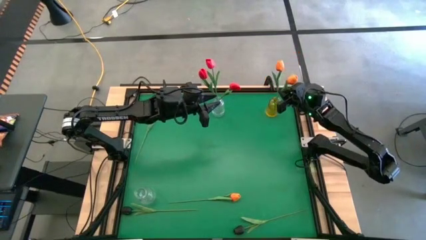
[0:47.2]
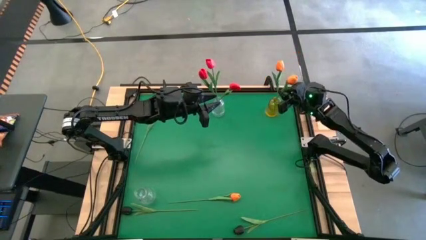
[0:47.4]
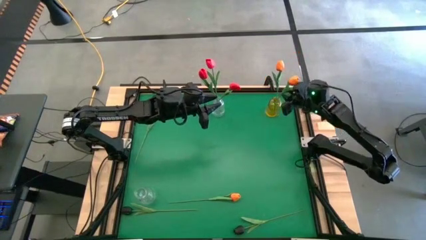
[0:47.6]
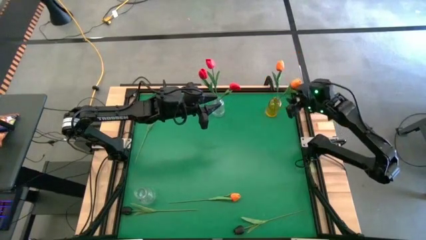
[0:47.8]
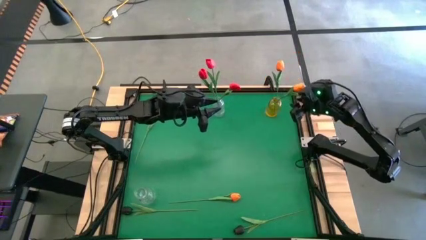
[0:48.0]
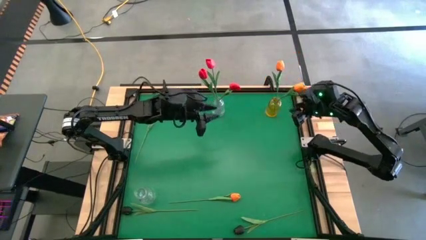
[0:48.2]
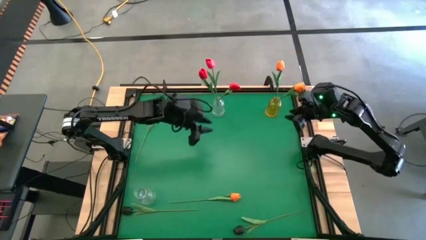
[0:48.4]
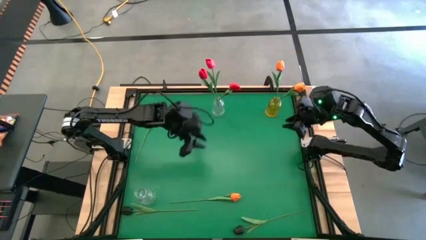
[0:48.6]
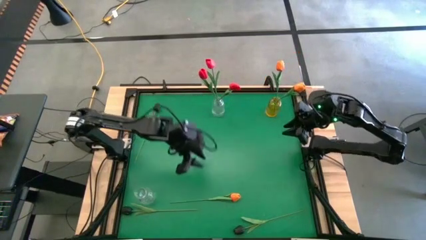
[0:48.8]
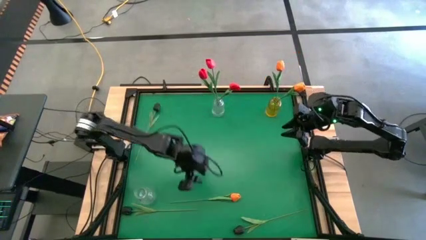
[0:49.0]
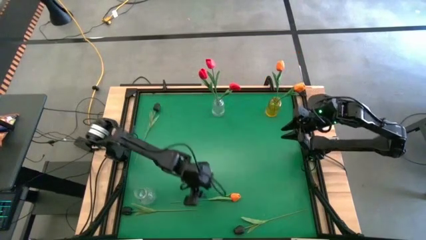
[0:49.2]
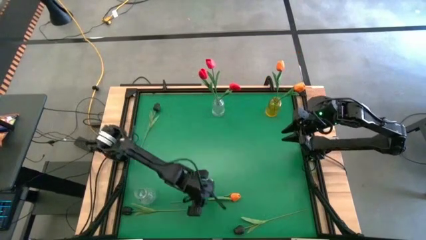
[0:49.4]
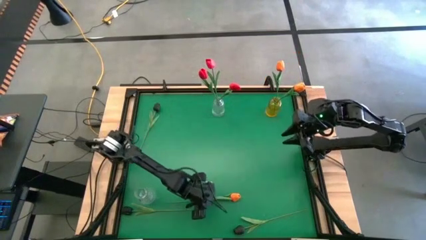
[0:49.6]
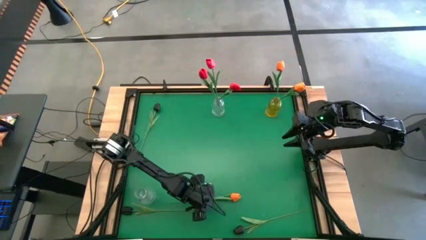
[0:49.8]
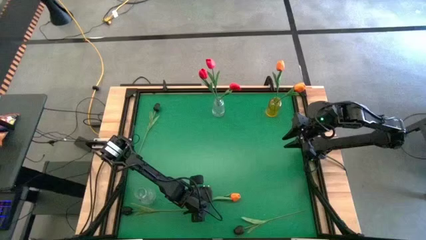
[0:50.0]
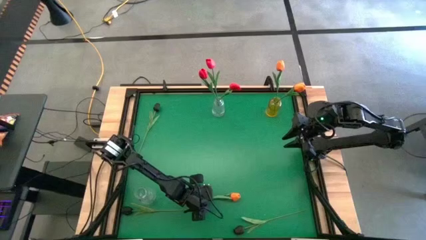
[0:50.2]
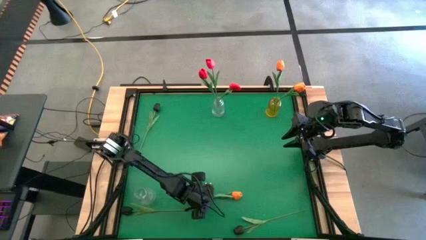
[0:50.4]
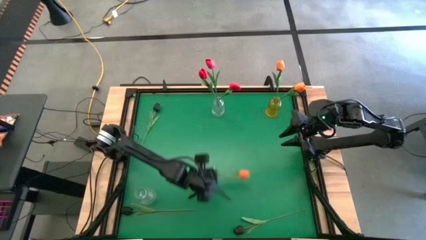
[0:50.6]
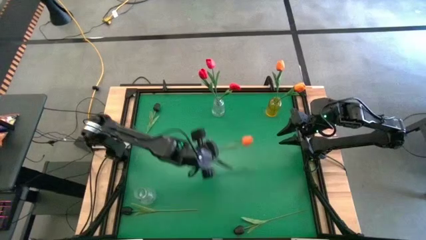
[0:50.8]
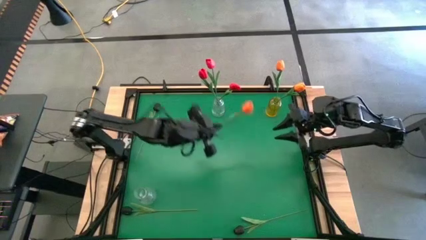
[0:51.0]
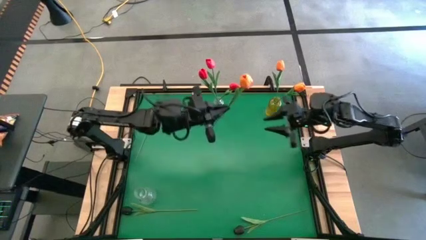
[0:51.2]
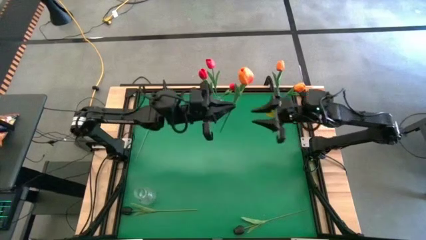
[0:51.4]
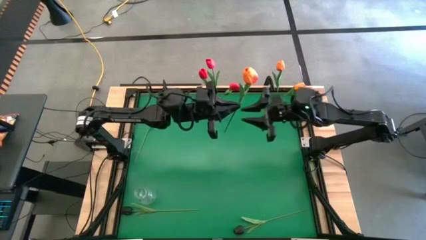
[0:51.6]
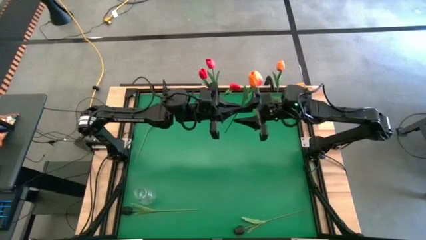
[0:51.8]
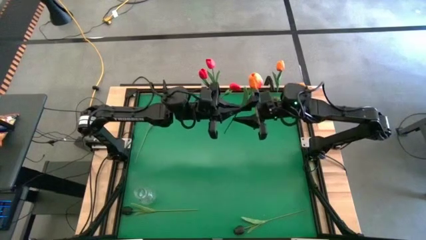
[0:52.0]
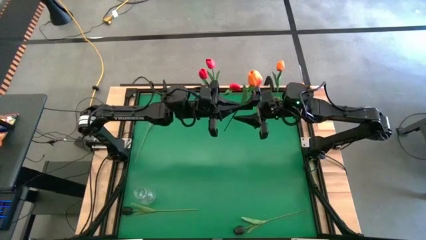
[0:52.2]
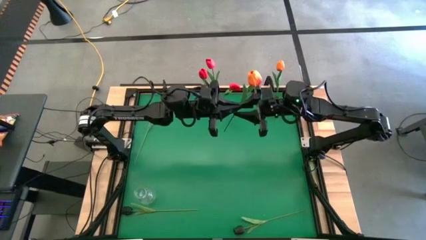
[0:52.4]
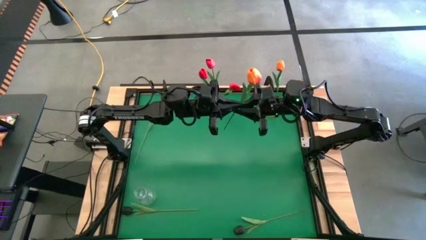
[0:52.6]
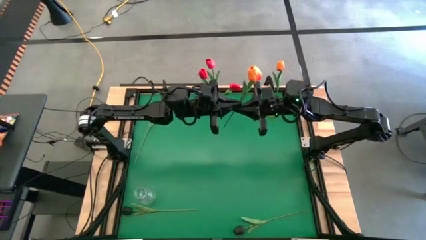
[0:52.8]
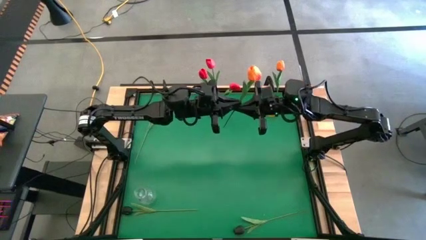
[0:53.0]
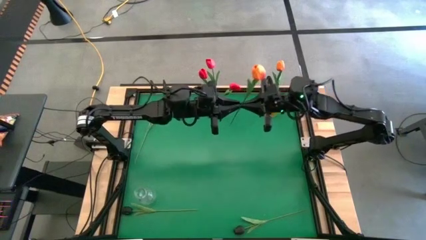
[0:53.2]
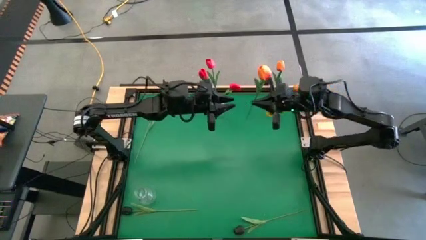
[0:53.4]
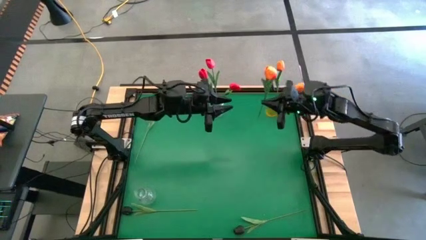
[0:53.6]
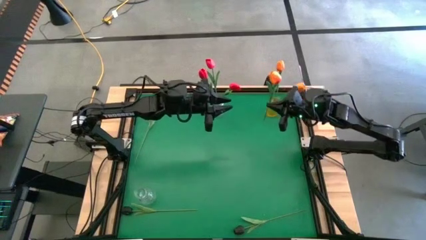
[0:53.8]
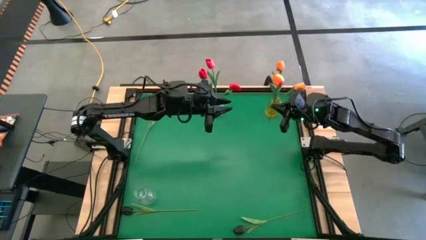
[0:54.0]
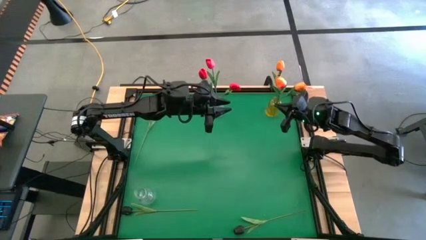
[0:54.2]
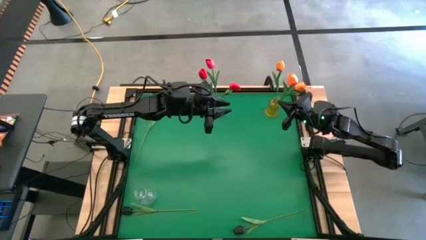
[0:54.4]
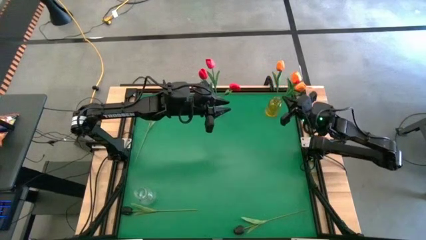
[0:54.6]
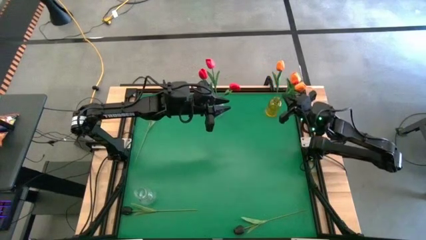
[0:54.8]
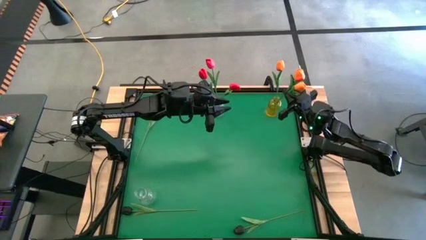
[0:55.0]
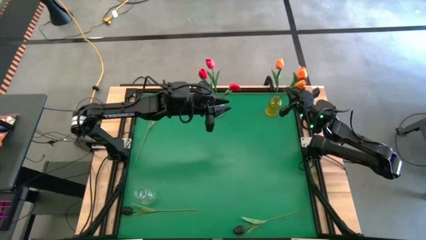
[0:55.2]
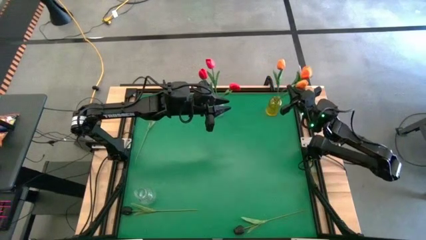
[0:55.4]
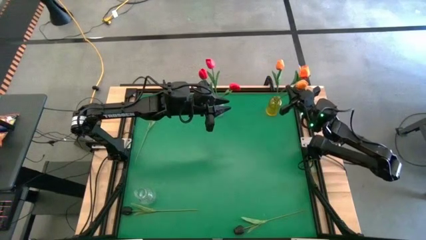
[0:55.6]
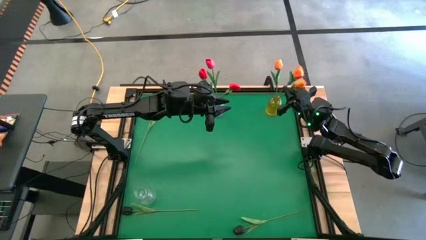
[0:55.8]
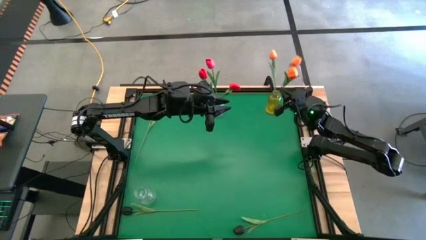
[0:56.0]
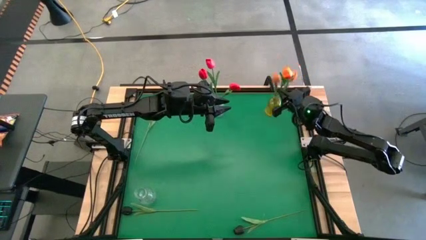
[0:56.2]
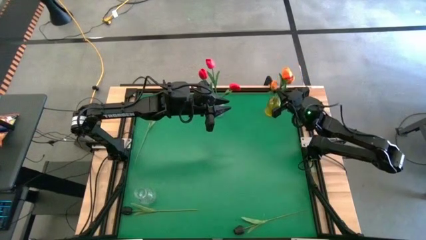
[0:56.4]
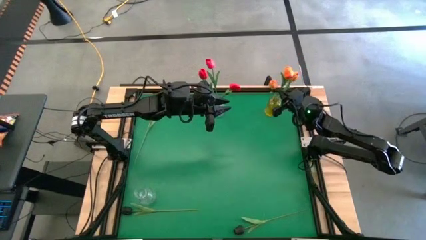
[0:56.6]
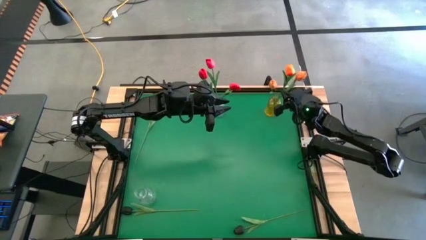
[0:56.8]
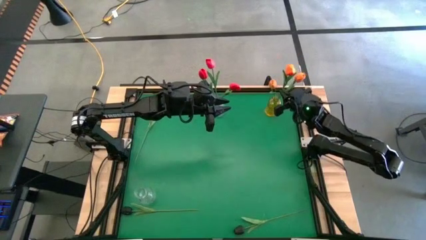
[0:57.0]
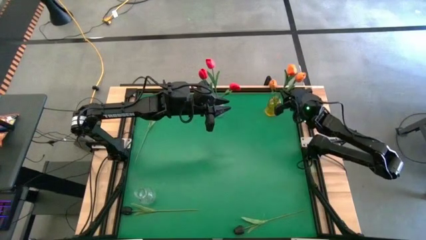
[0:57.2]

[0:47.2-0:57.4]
Task: Sort flowers into vase by color
Put the orange flower into the yellow vase

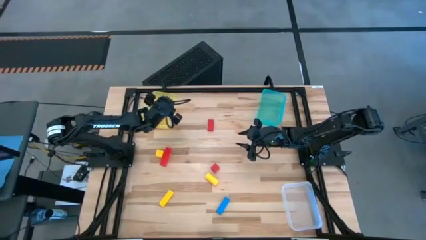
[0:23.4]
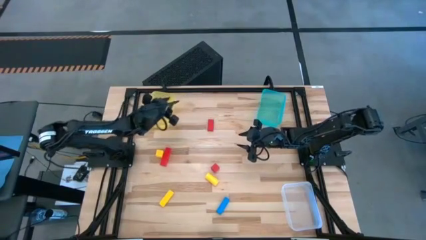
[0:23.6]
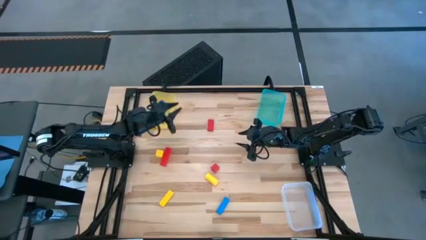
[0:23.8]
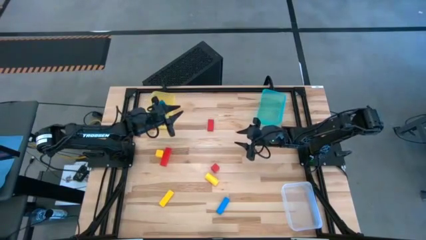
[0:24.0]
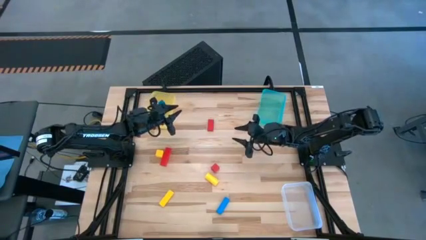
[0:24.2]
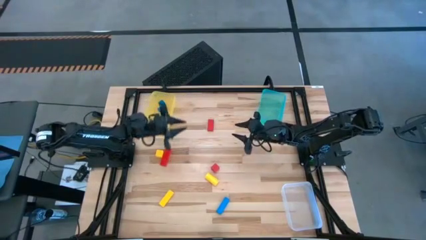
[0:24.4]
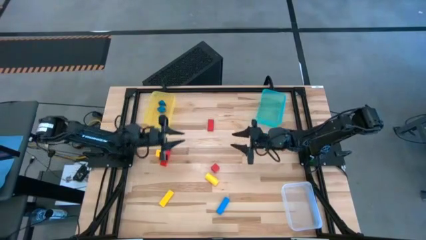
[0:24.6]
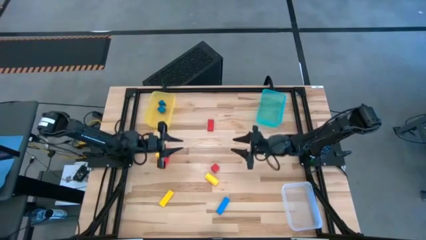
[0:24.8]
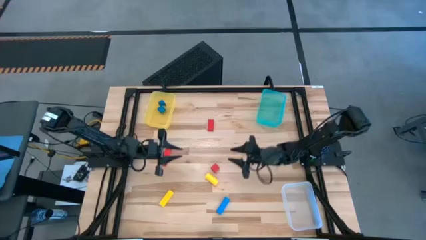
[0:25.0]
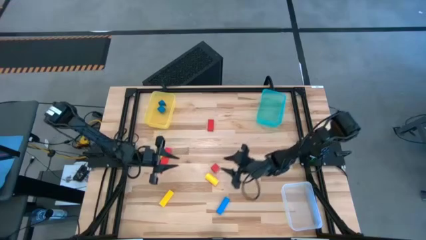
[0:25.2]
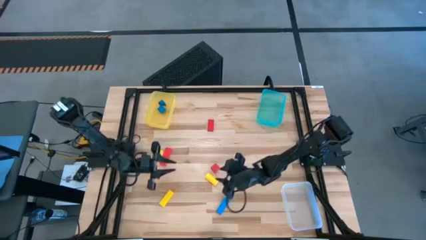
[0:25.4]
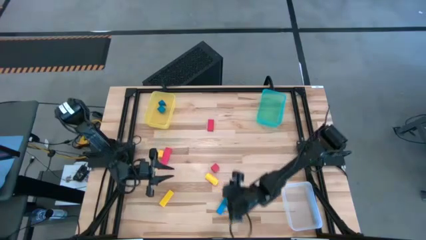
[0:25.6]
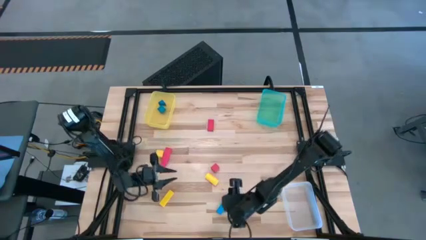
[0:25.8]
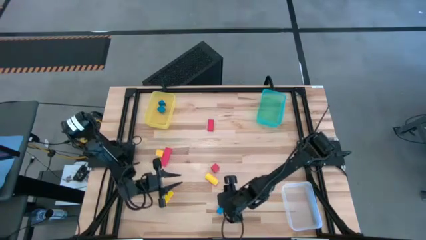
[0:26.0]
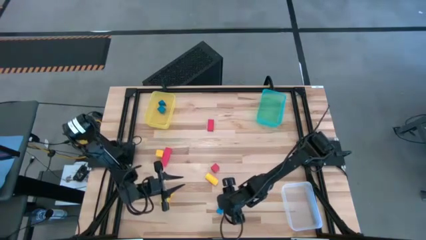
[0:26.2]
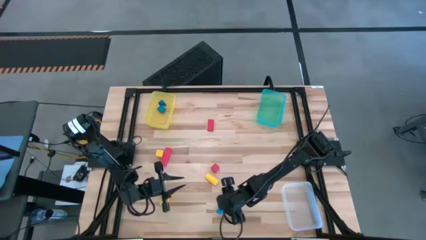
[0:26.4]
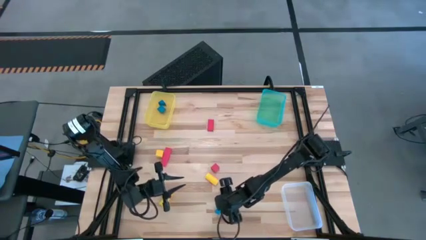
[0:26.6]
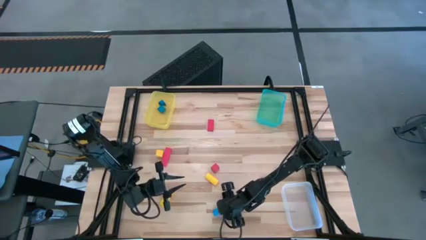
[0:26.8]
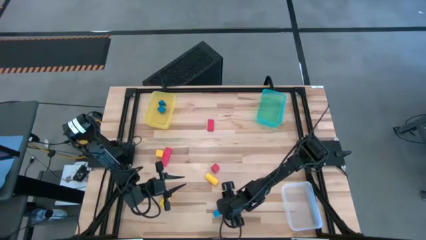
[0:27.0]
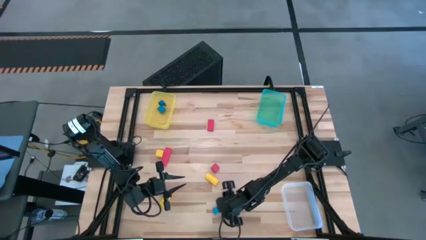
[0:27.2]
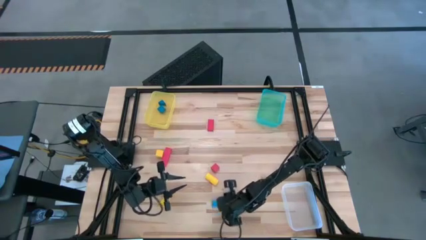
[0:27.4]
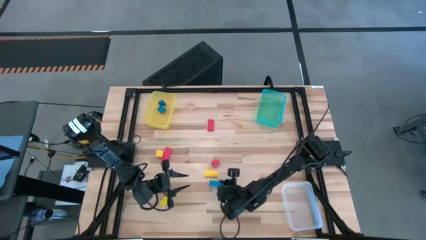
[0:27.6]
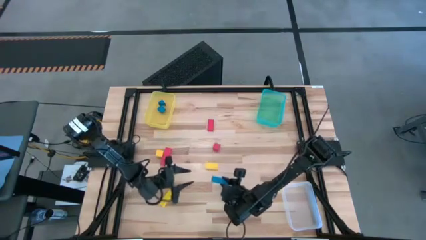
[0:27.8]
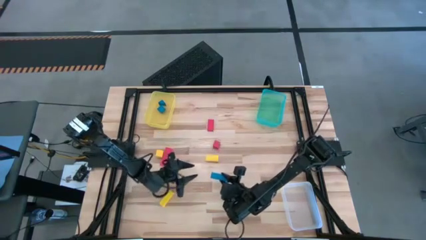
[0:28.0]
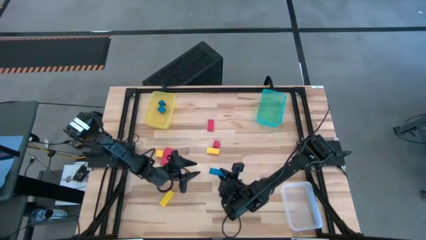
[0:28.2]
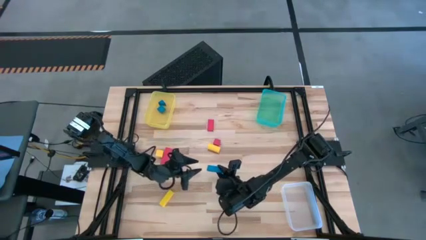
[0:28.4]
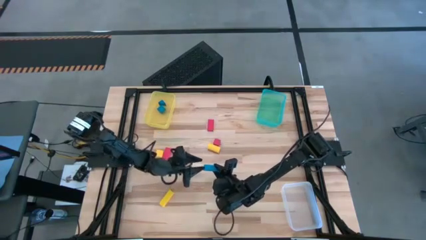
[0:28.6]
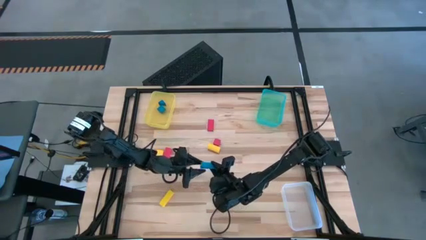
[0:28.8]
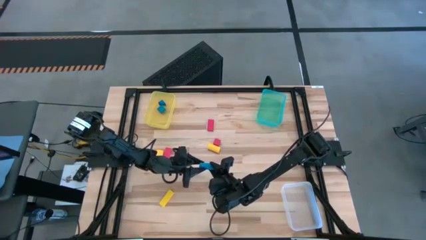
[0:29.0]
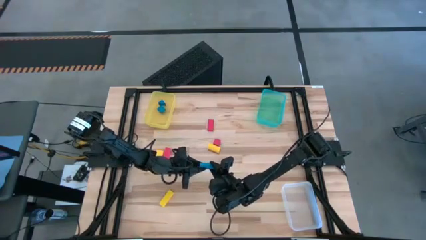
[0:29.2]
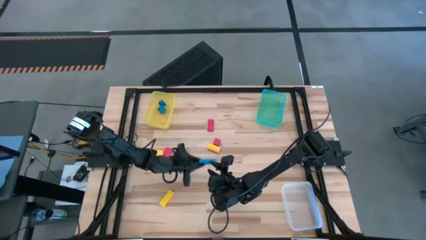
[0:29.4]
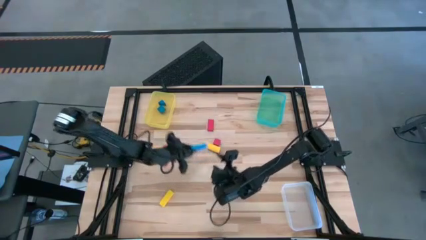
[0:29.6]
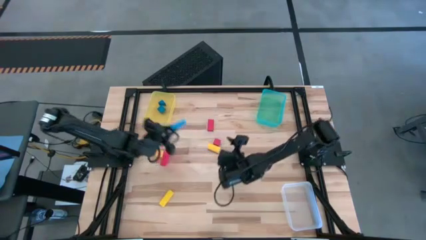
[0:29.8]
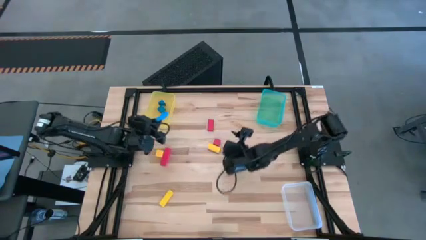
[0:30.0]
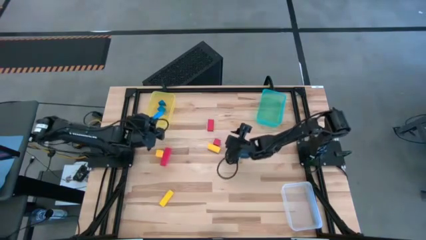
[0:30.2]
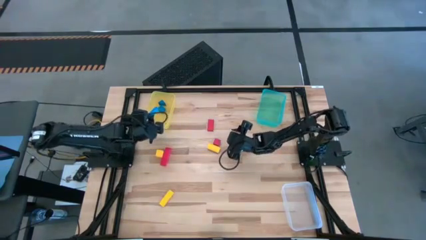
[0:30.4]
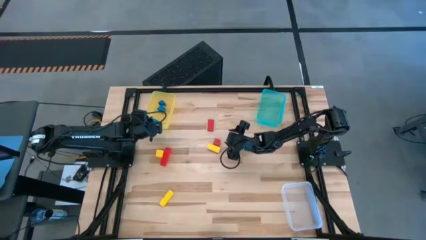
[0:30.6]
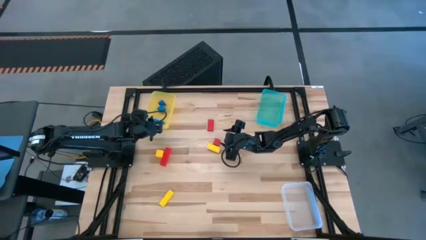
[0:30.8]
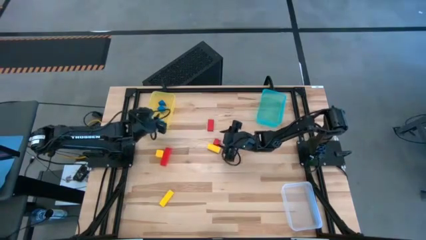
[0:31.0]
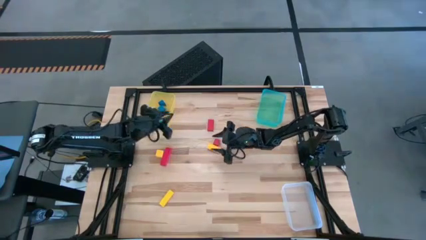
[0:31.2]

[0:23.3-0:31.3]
Task: Sort & place blocks by color
Put the blue rectangular block into the yellow bin
